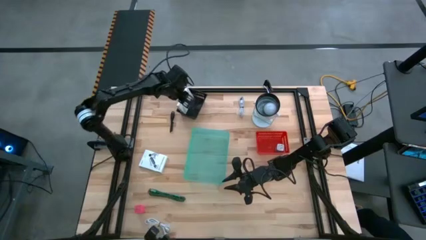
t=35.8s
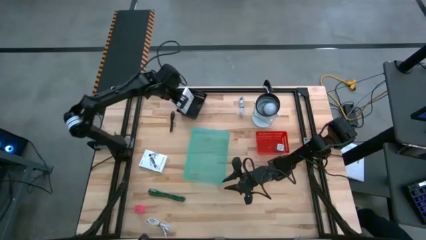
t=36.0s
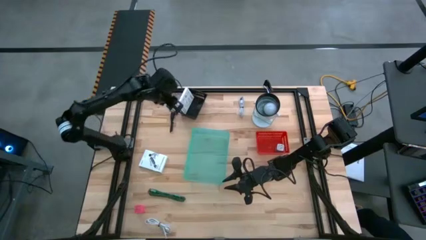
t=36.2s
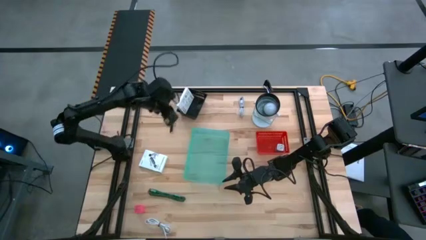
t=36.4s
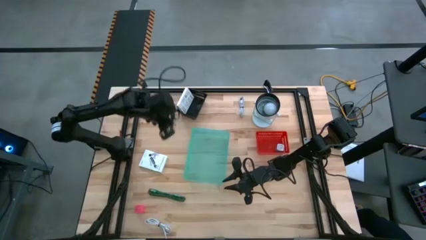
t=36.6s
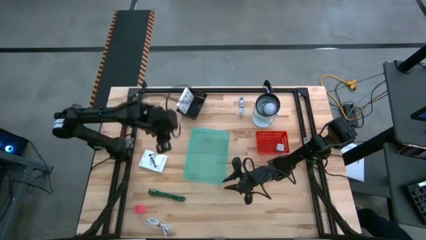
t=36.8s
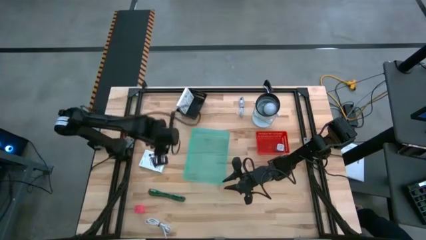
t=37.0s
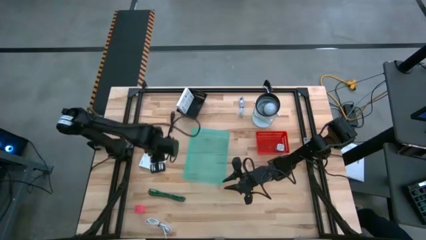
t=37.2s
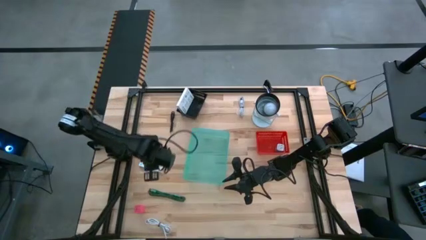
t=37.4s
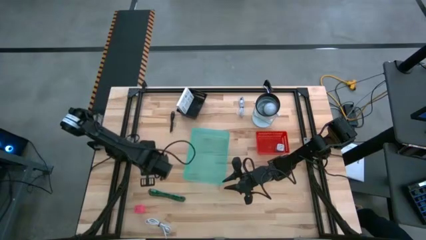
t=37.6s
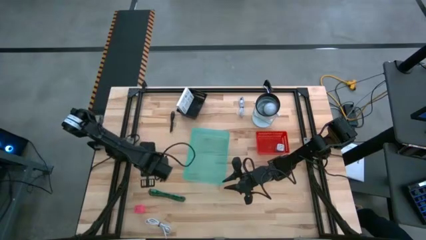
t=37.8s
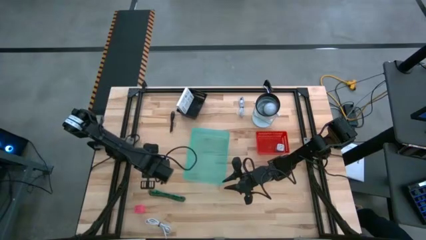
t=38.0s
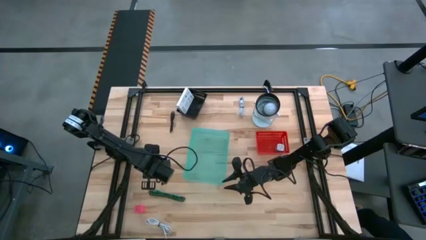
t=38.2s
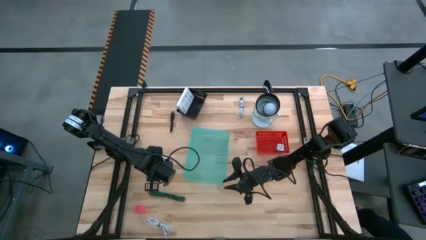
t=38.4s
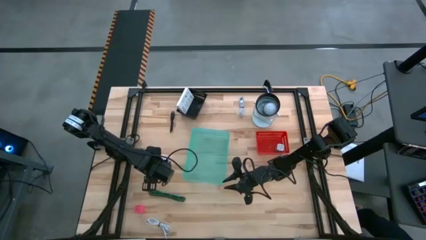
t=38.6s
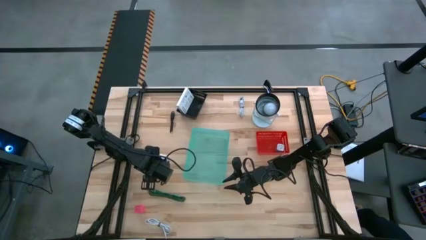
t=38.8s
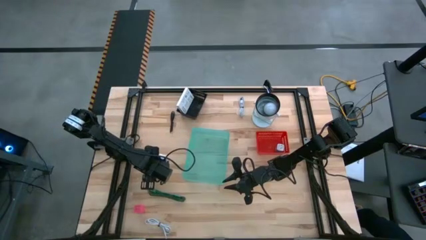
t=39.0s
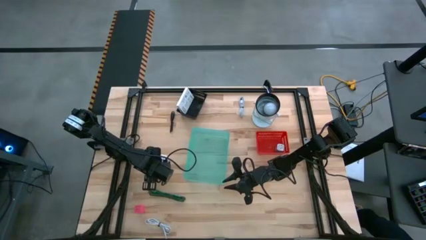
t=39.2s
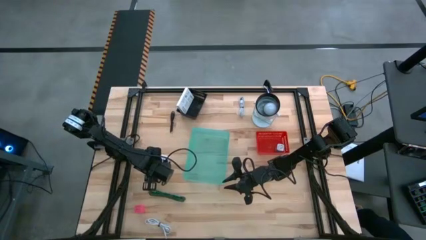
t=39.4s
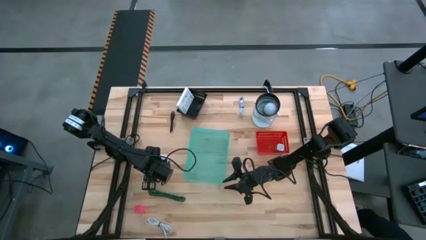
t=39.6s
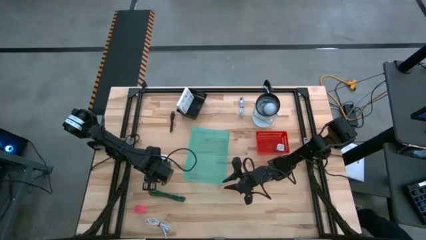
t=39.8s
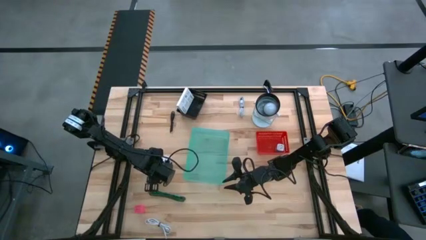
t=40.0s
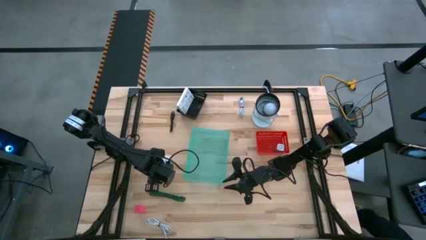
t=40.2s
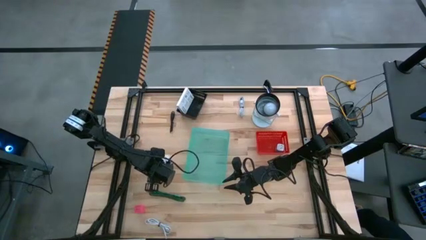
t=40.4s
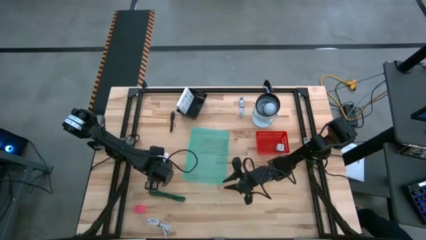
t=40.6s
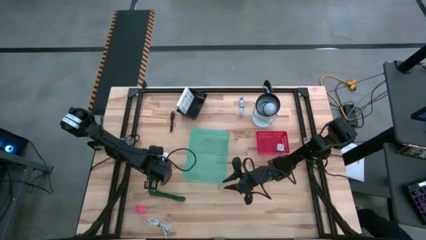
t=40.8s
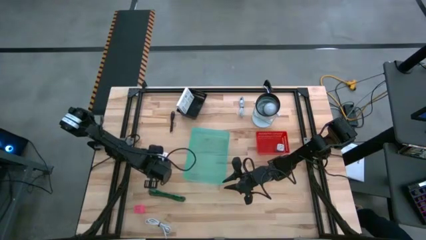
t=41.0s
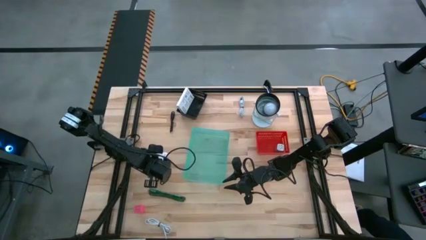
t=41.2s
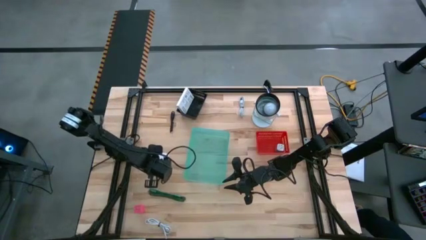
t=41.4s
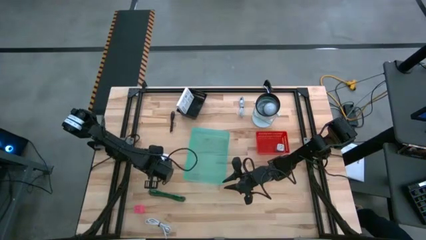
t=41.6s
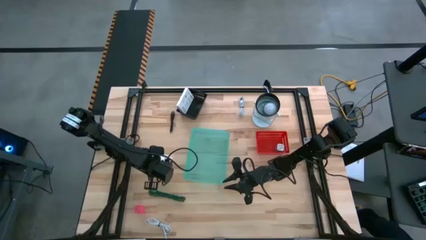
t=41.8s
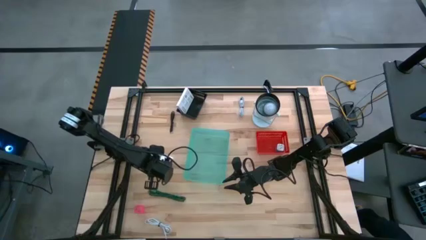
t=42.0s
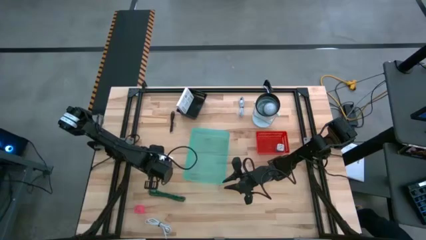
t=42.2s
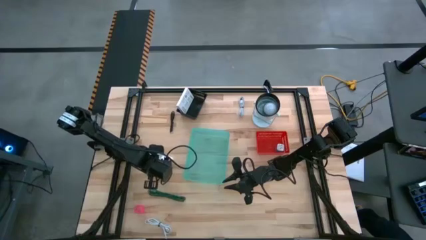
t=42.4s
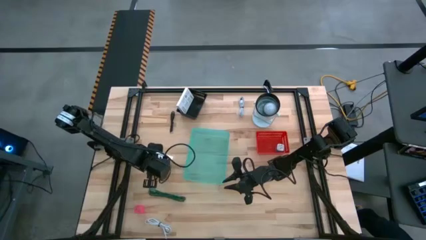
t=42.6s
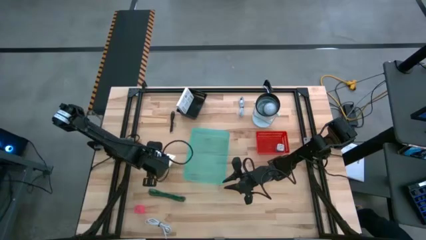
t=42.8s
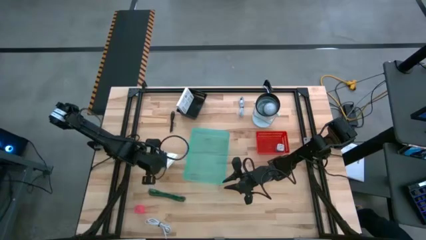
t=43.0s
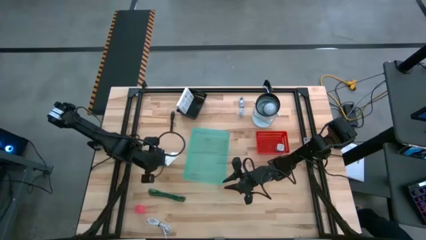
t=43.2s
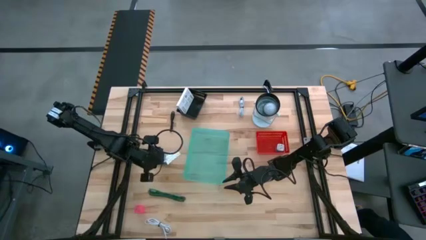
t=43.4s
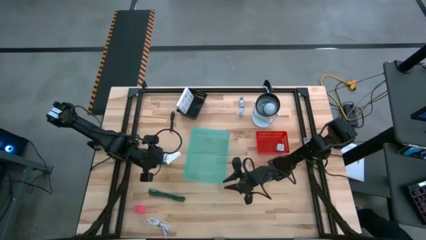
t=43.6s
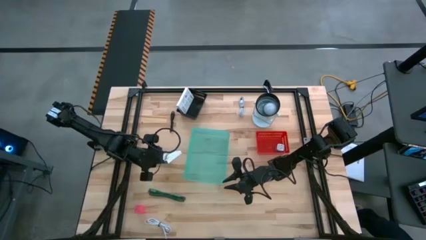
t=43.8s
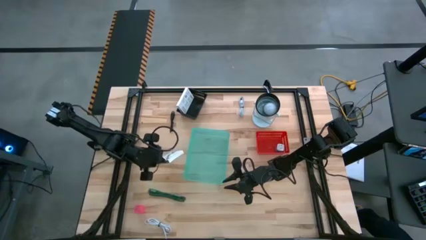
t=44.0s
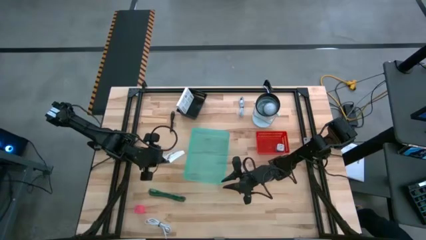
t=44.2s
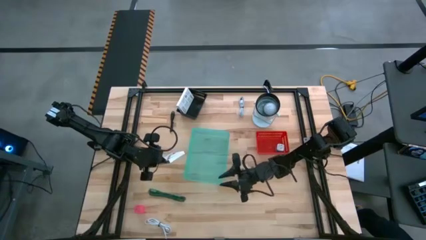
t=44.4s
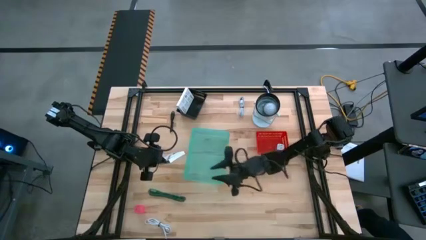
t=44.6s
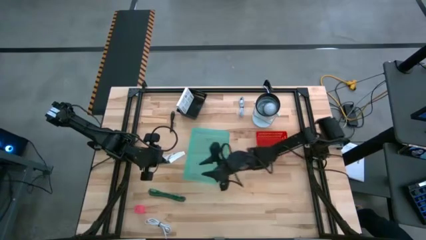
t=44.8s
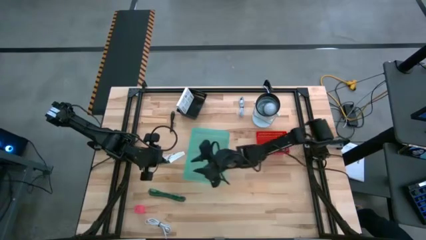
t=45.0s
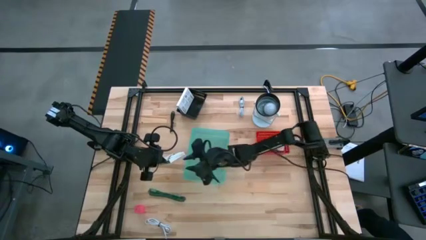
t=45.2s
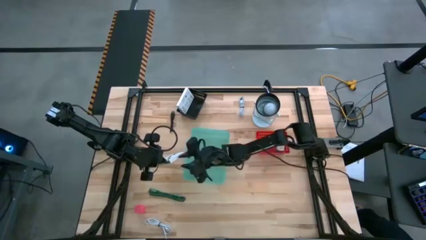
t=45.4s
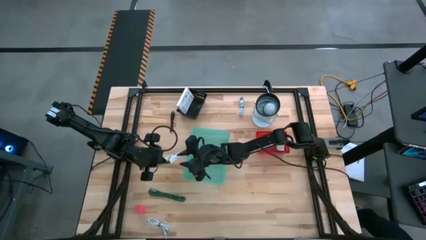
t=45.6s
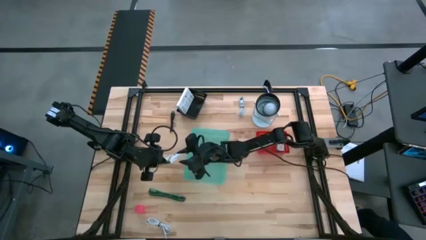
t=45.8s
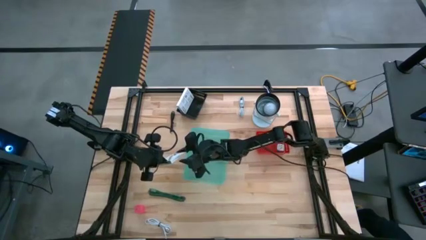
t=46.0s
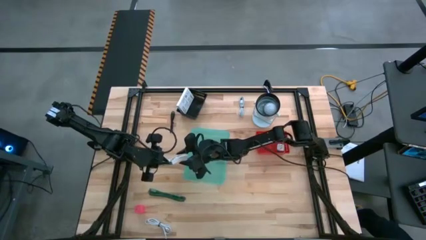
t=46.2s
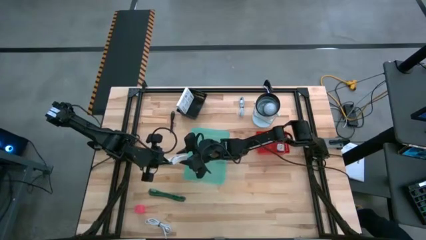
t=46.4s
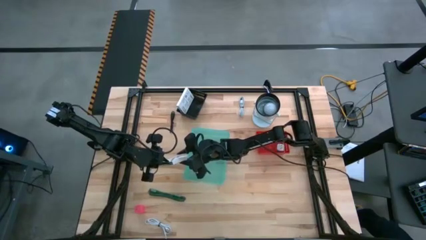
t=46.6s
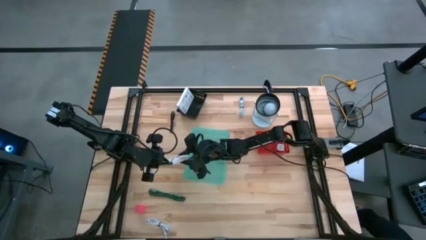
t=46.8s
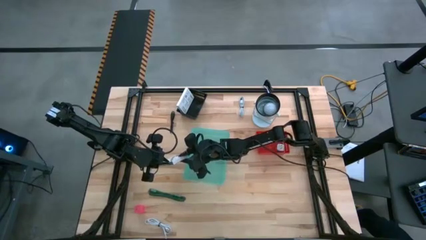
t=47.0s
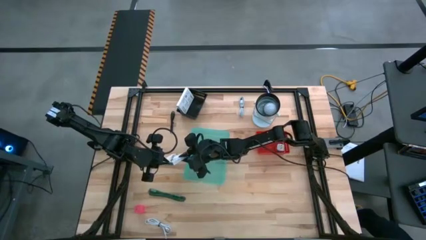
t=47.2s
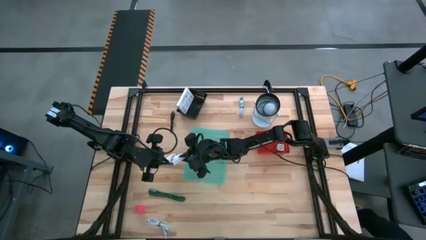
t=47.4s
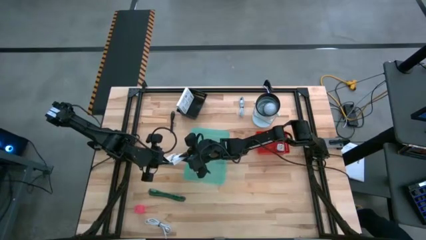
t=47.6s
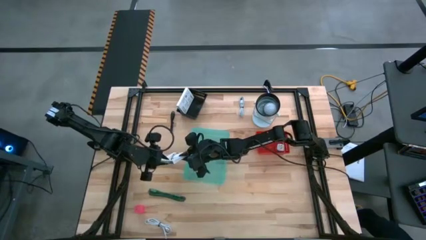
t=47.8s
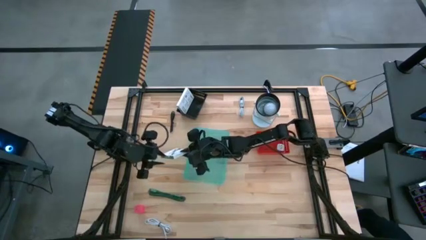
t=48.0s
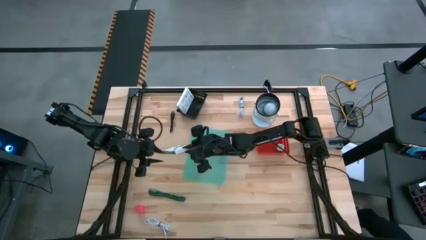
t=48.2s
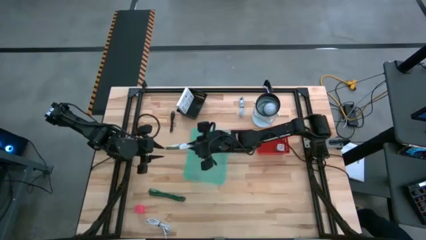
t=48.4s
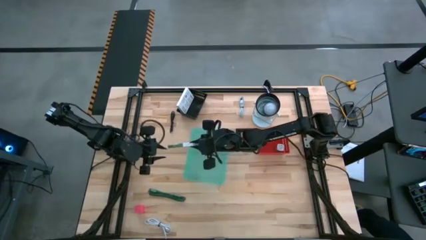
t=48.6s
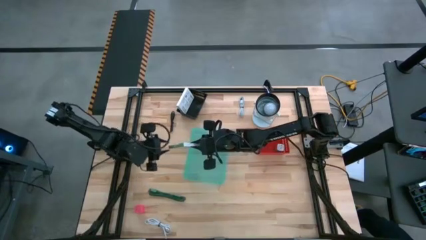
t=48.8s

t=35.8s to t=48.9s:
Task: Pick and place items into bin
Put the card reader box into the black basket
